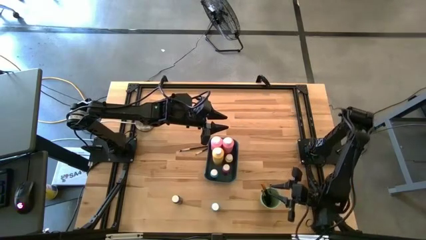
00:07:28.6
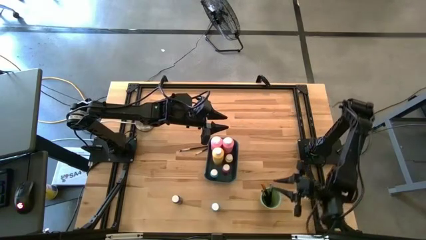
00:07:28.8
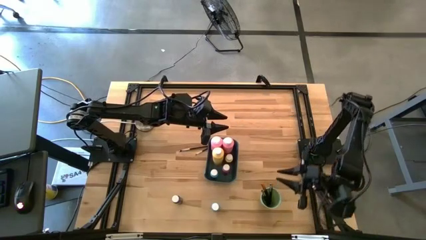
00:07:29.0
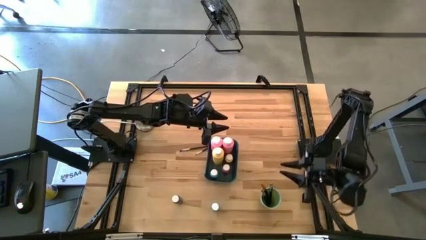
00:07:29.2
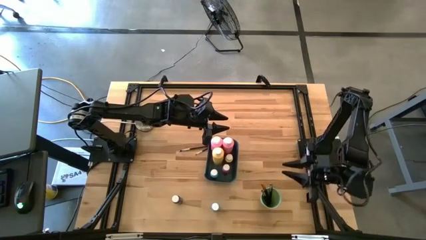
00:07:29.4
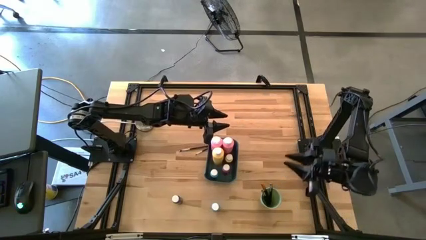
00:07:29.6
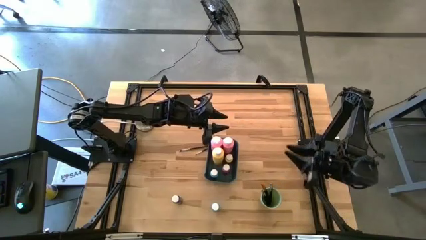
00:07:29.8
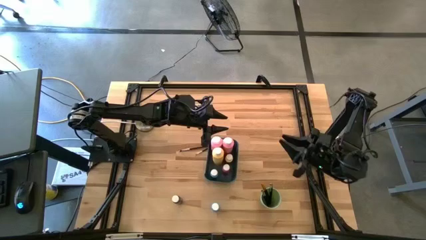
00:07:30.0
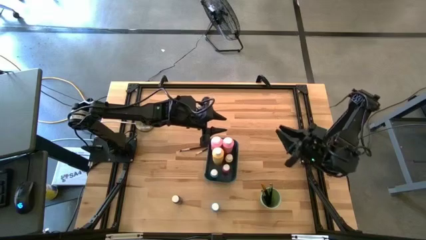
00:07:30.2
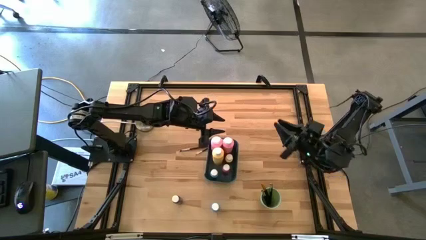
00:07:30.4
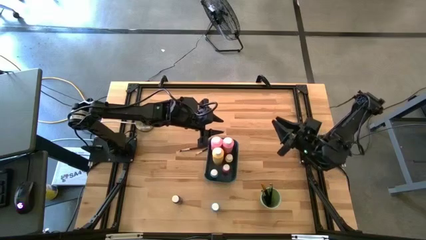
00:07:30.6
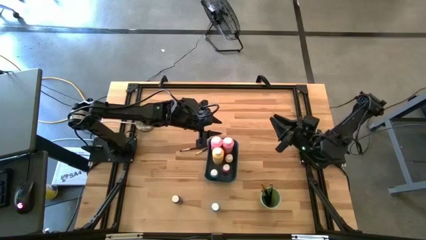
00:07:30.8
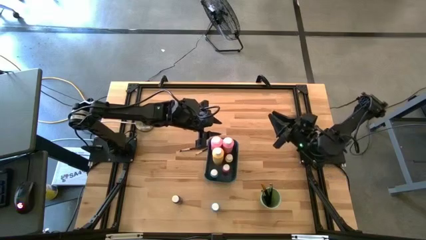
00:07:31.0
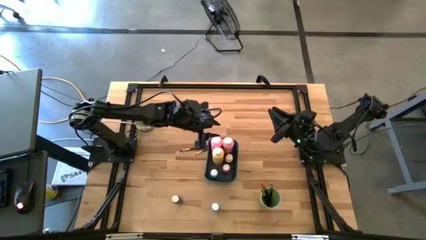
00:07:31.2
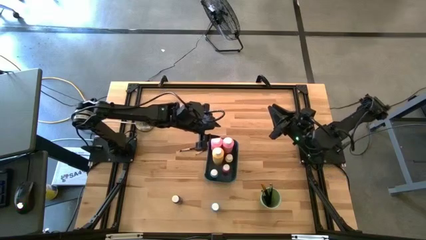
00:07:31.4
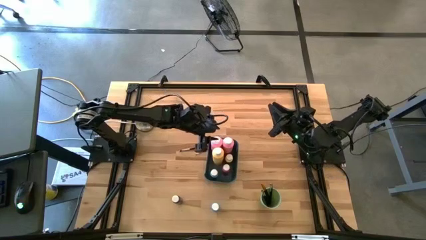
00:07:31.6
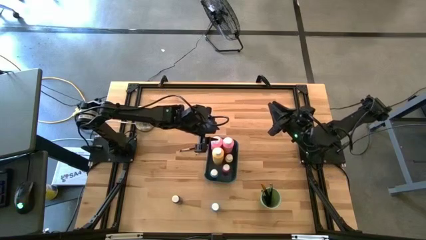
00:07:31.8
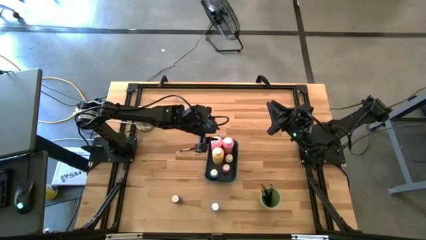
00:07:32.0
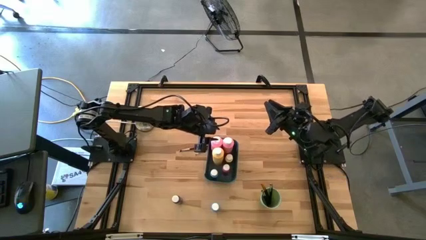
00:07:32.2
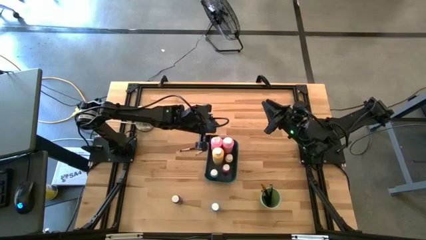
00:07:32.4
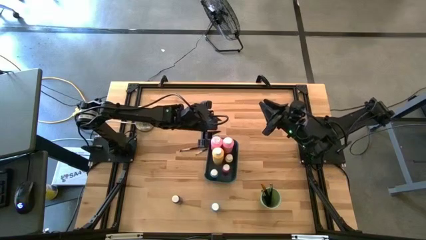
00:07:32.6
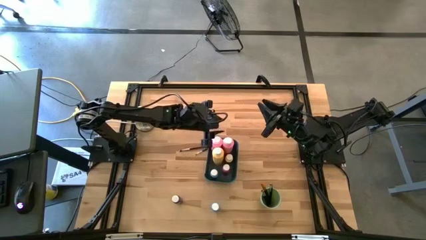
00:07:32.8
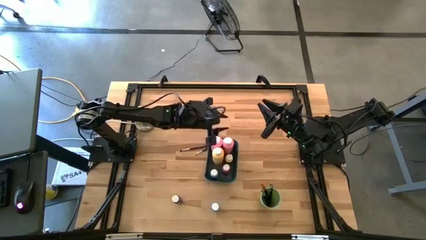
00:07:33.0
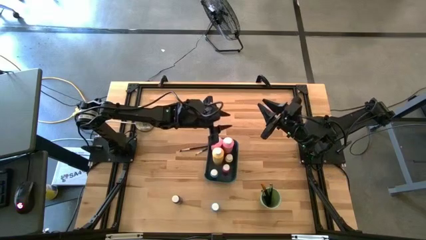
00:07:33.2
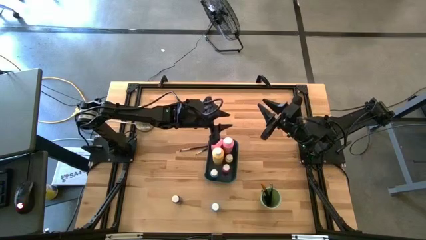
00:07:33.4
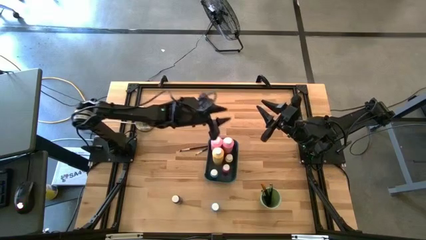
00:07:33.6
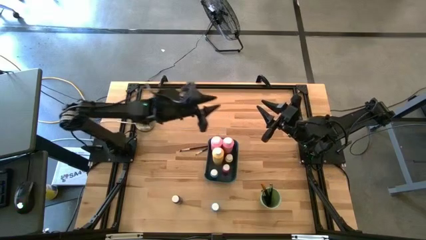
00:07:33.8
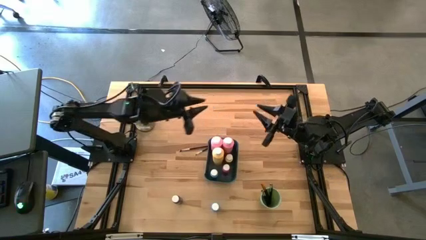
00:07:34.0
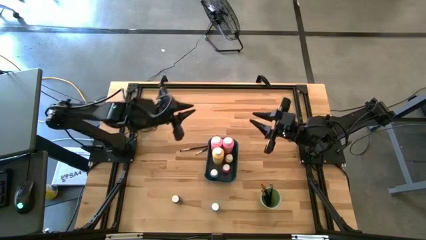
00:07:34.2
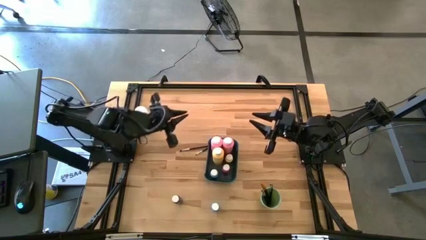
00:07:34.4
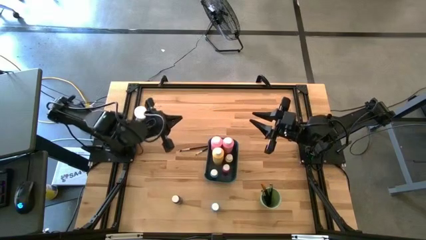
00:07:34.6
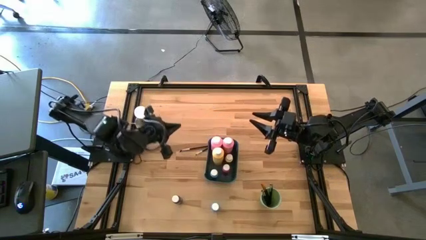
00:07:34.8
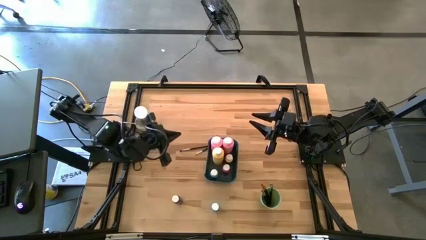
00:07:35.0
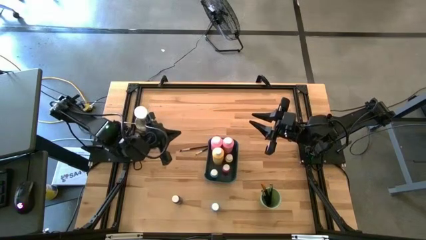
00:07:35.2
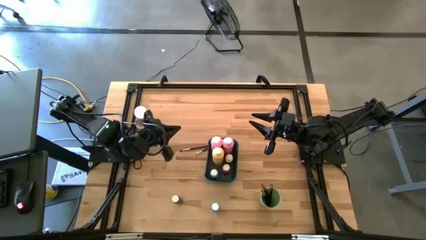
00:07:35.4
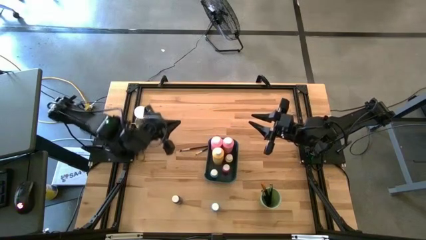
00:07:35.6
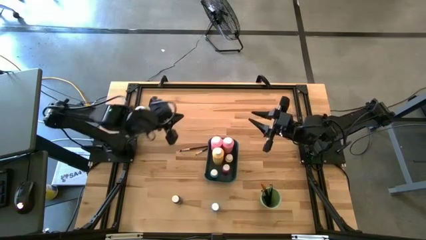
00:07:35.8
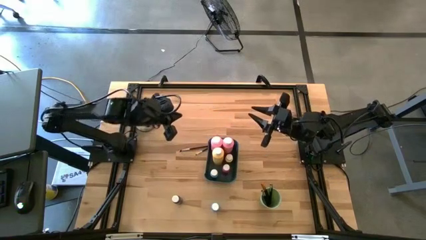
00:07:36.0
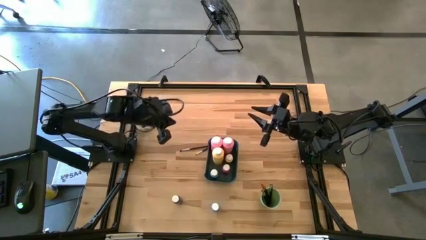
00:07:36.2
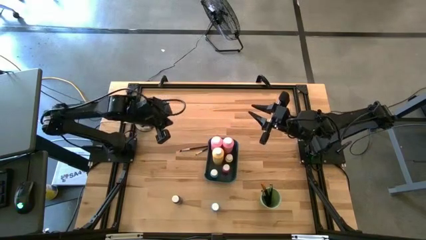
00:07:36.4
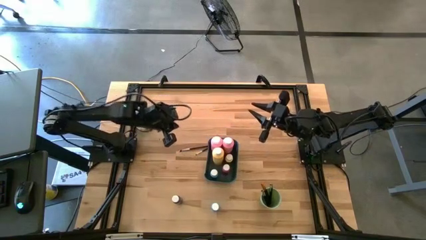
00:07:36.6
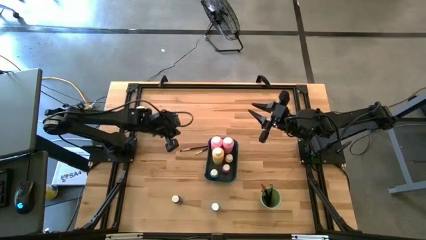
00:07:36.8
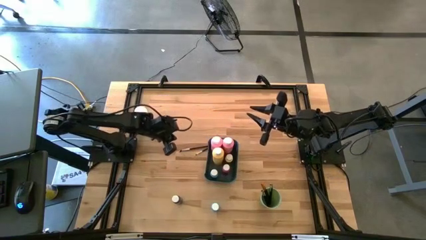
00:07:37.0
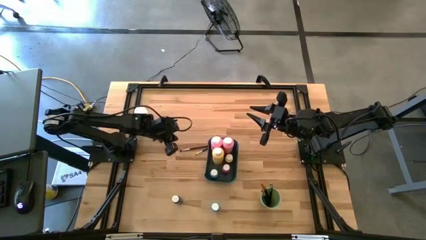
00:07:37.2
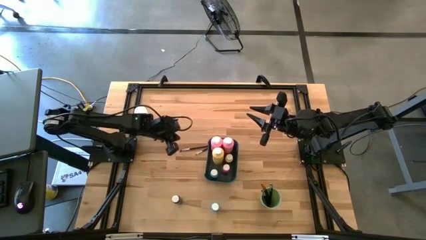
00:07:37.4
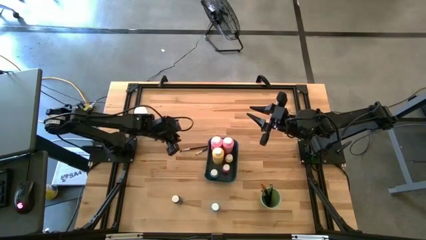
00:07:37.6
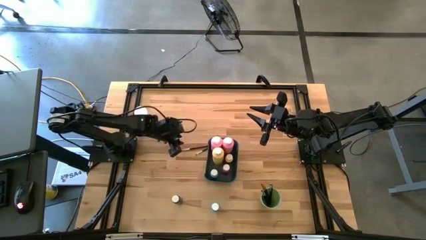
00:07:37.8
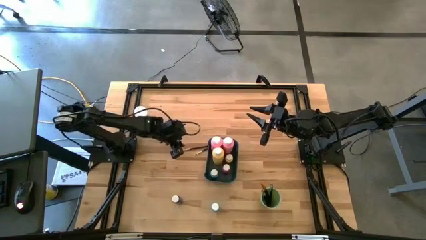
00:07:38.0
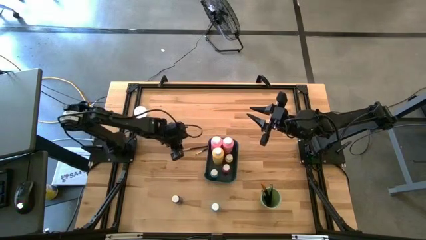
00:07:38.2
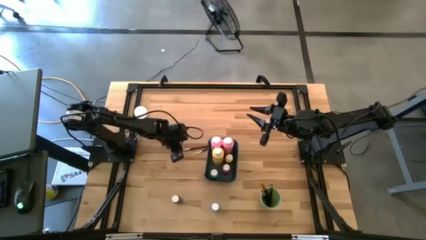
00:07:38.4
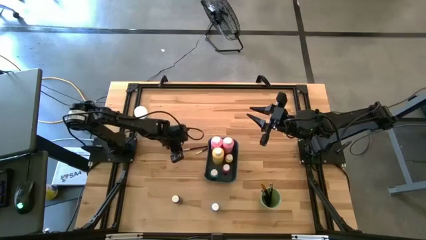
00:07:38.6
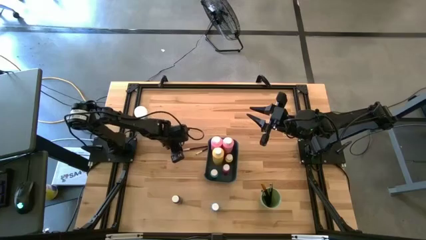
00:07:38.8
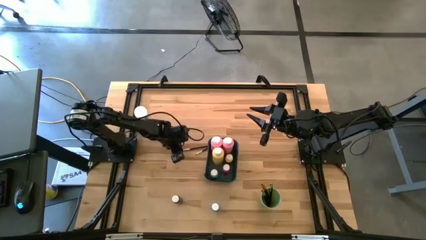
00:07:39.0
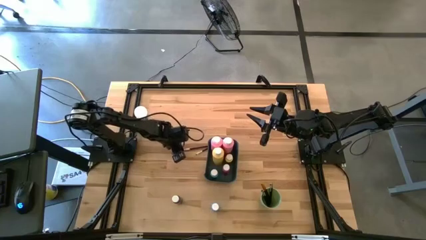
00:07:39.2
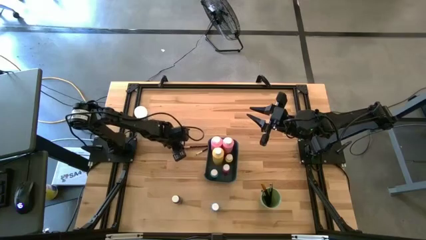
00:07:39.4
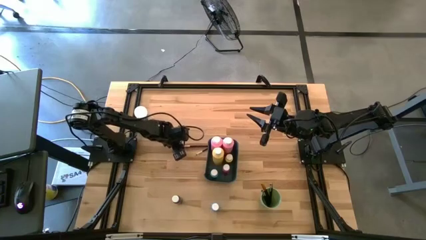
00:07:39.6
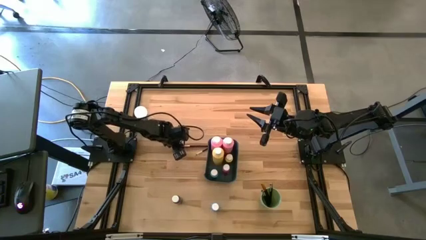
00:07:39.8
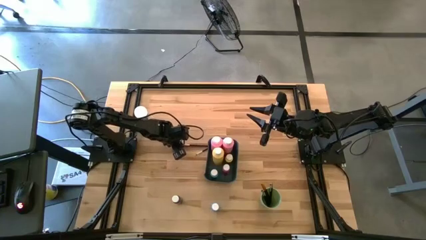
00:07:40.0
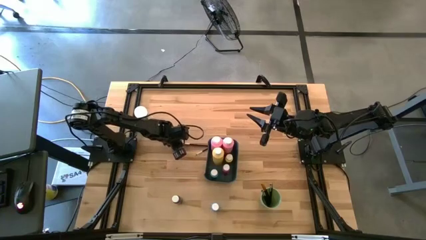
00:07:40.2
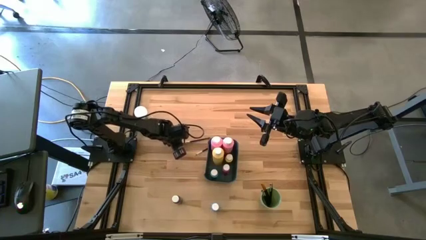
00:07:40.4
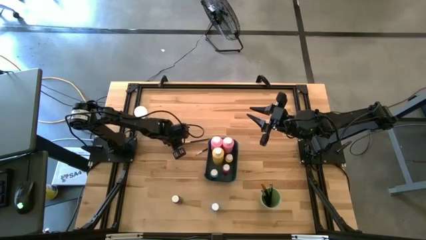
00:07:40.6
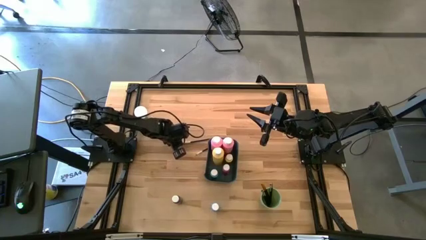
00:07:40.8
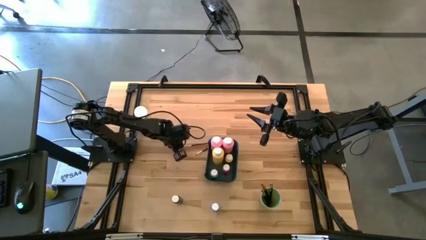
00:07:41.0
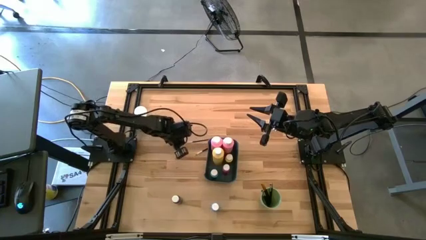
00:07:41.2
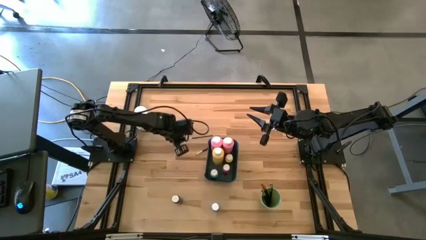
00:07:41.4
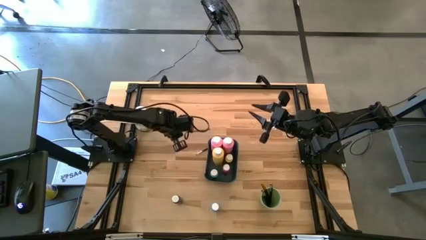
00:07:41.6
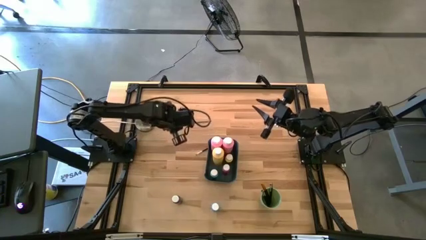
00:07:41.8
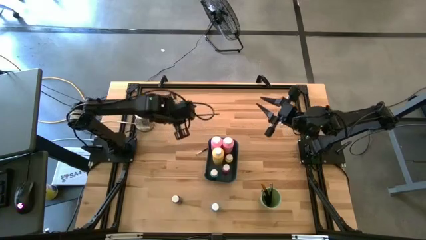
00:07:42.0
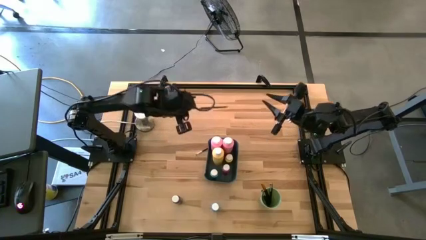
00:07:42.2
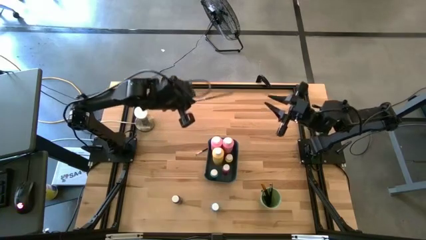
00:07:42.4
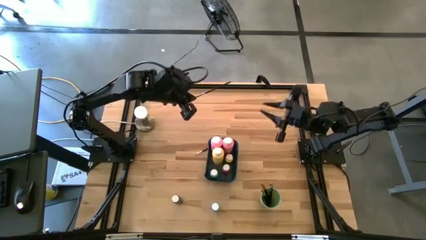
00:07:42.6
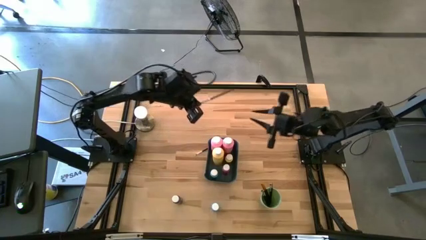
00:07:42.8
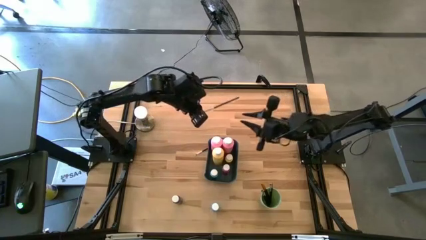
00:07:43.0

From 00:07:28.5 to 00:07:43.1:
Task: Pick & Place Paint Supplies
Put the black and silver paint brush into the green cup

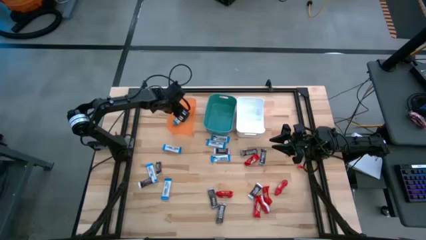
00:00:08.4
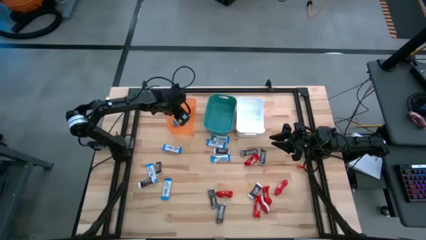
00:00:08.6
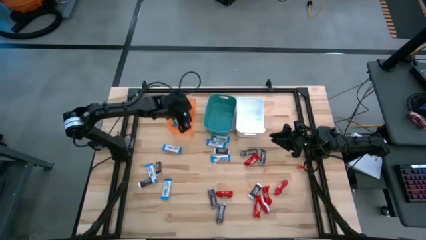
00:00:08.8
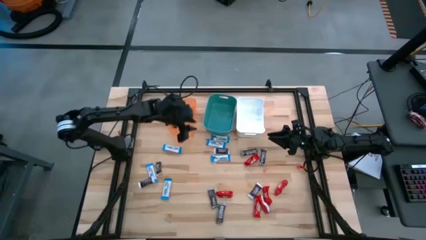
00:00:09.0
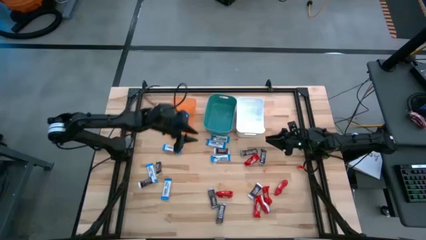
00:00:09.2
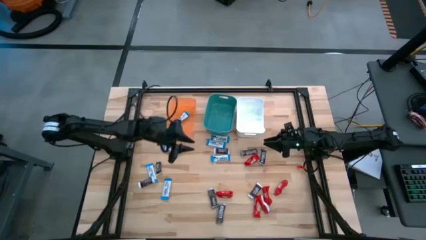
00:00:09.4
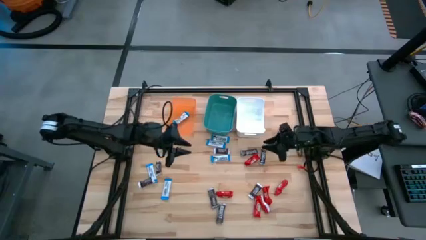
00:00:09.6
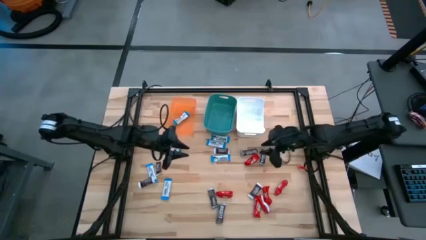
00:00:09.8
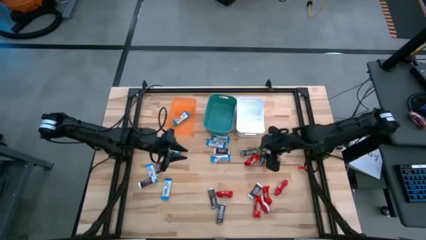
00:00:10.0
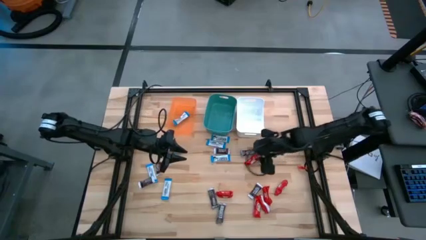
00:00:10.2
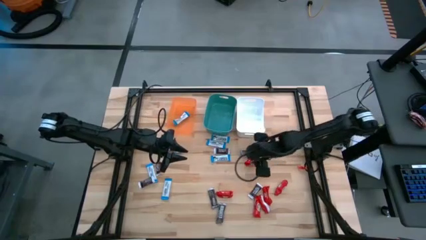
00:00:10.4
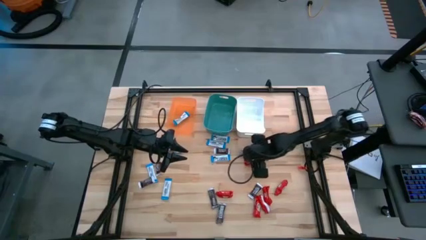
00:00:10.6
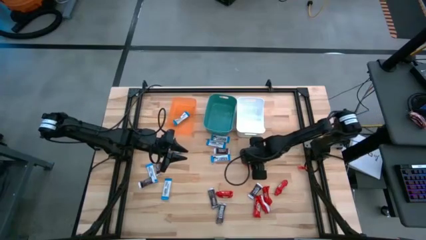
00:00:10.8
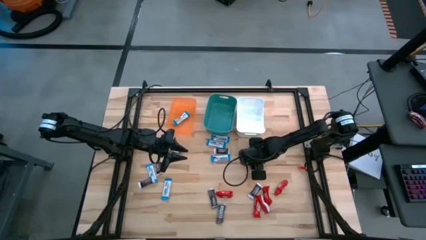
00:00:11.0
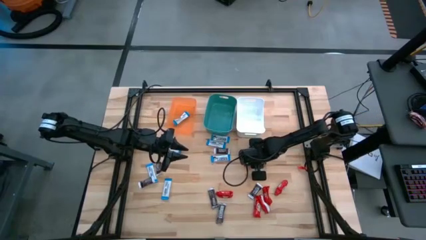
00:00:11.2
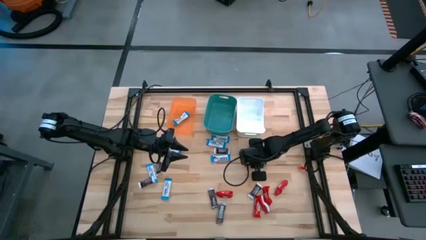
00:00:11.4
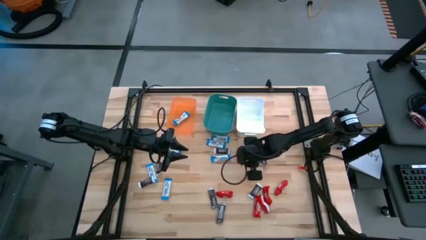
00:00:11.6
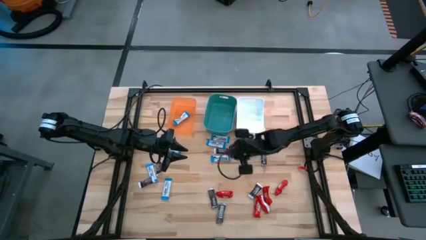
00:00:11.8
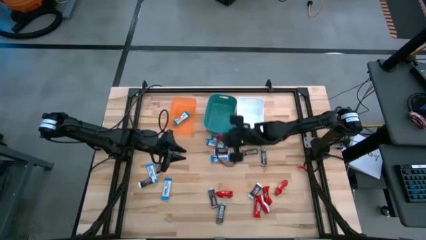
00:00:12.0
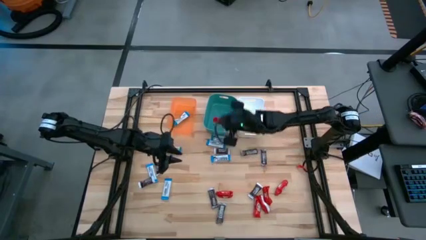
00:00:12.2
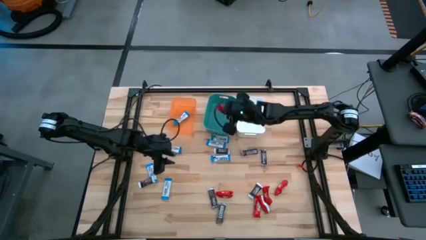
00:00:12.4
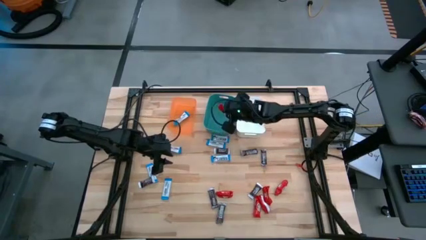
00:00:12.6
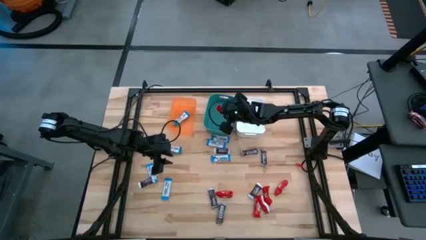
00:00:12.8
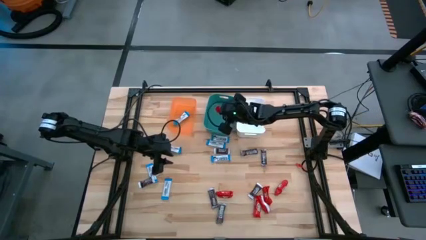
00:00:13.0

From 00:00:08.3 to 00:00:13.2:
Task: Organize candy in baskets
Put the red chocolate into the green bin
